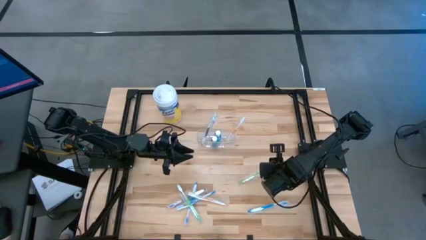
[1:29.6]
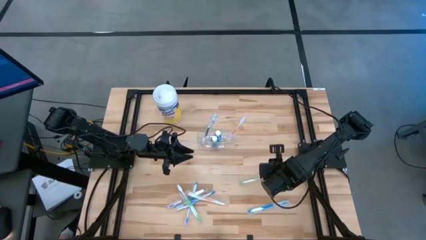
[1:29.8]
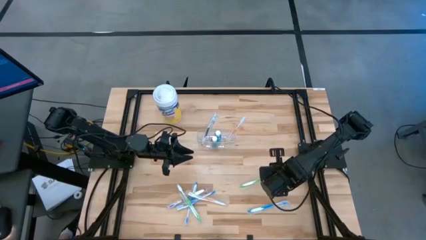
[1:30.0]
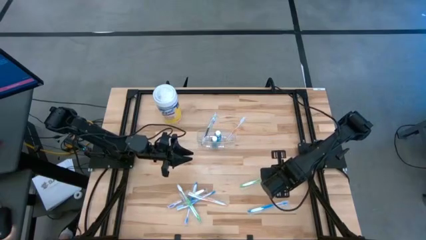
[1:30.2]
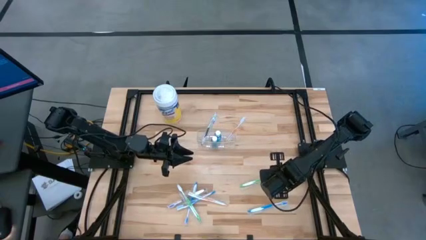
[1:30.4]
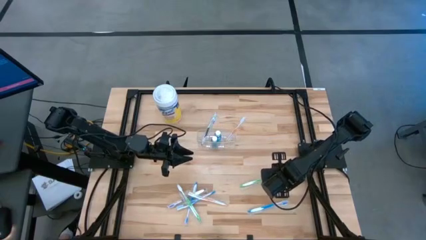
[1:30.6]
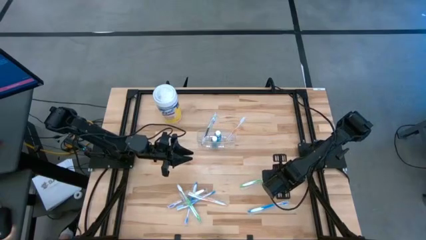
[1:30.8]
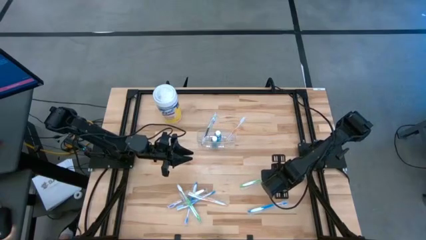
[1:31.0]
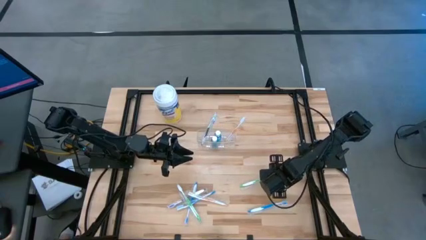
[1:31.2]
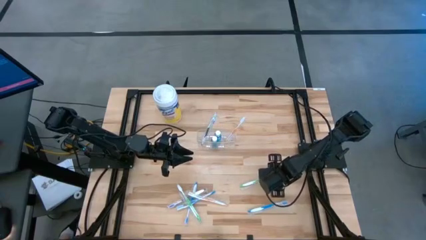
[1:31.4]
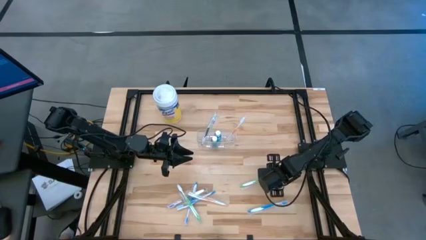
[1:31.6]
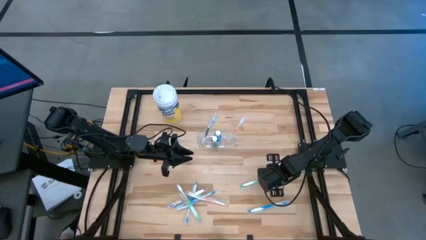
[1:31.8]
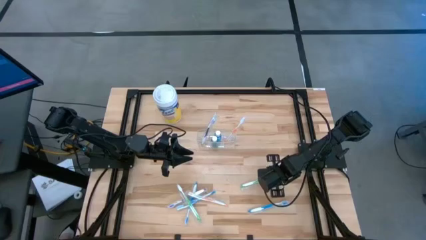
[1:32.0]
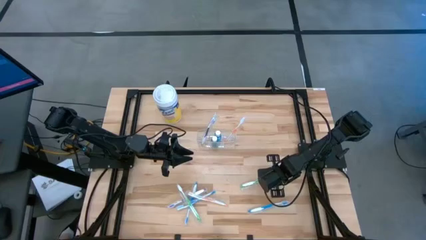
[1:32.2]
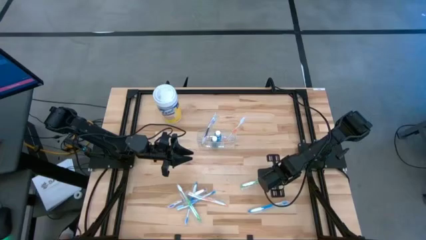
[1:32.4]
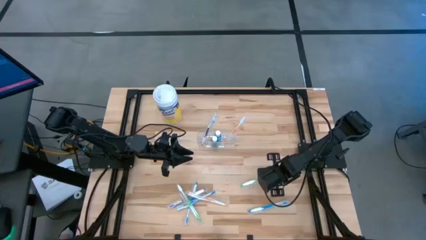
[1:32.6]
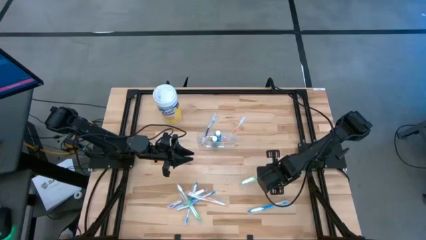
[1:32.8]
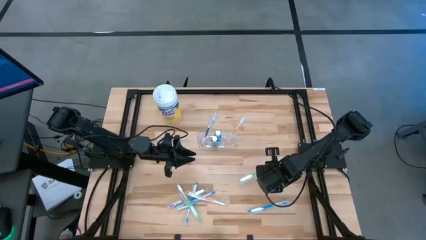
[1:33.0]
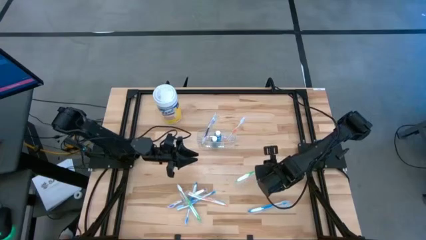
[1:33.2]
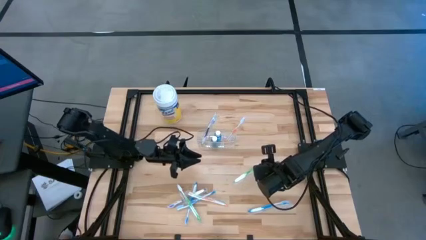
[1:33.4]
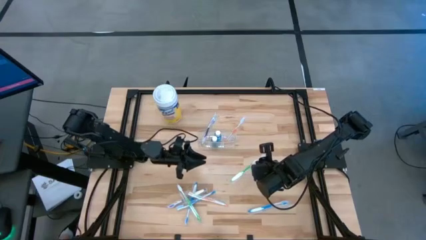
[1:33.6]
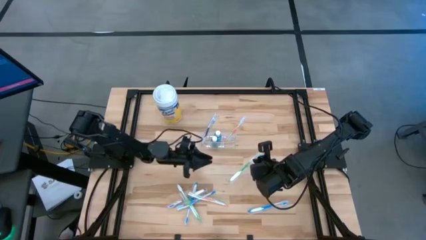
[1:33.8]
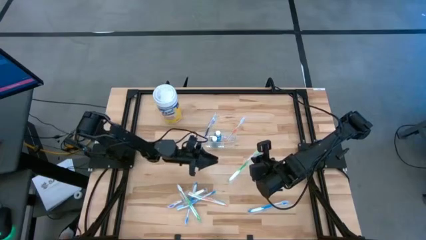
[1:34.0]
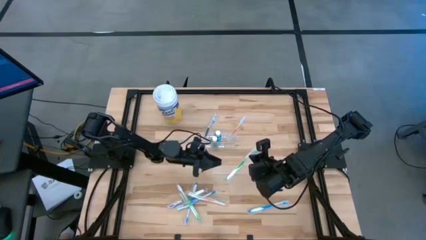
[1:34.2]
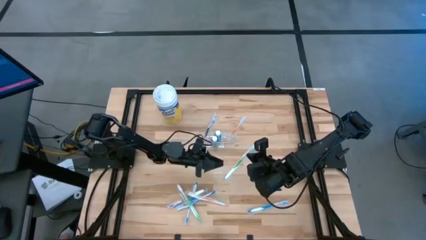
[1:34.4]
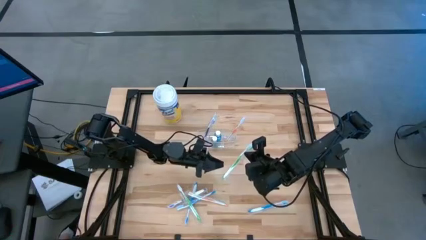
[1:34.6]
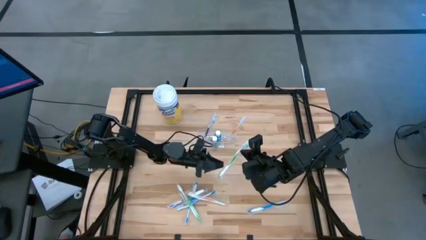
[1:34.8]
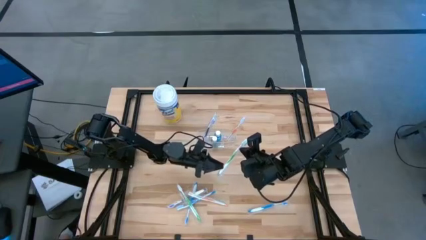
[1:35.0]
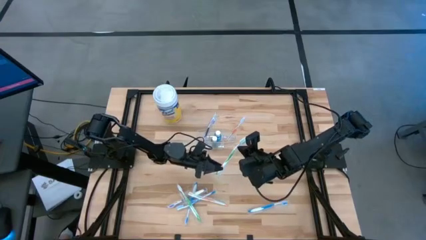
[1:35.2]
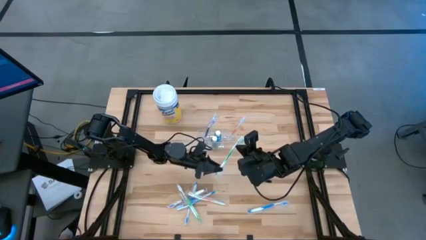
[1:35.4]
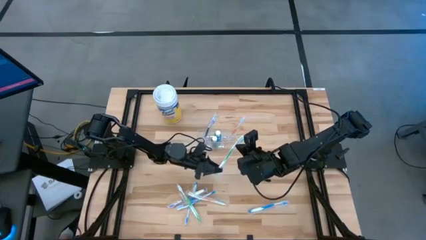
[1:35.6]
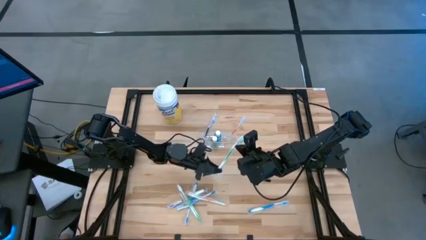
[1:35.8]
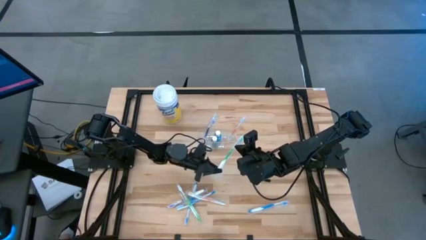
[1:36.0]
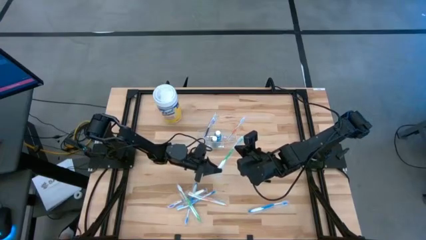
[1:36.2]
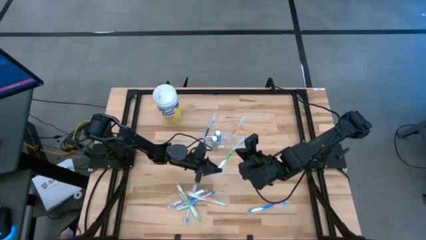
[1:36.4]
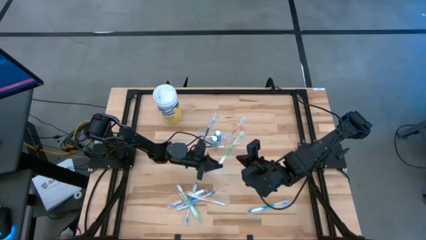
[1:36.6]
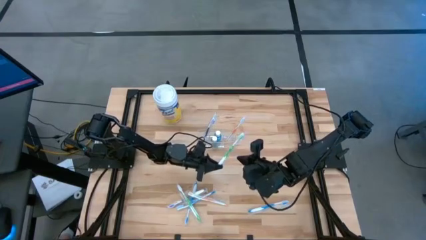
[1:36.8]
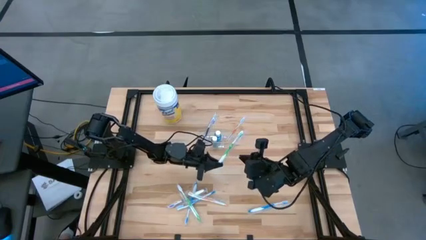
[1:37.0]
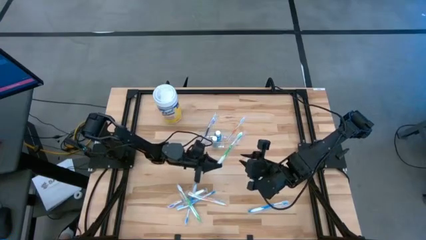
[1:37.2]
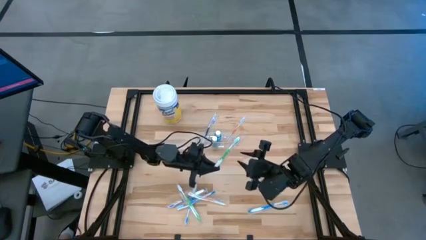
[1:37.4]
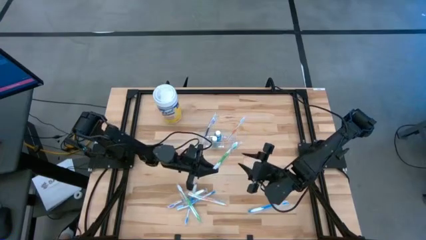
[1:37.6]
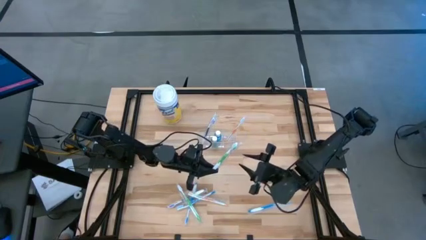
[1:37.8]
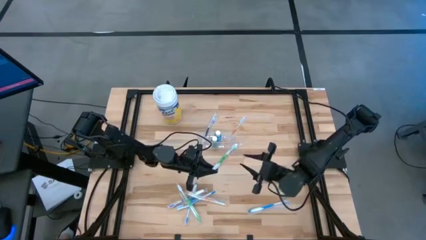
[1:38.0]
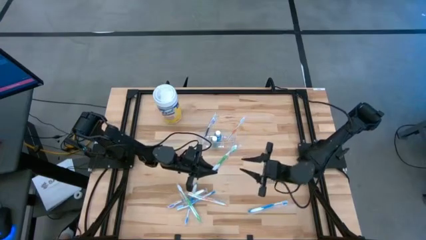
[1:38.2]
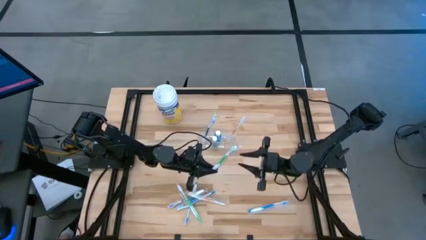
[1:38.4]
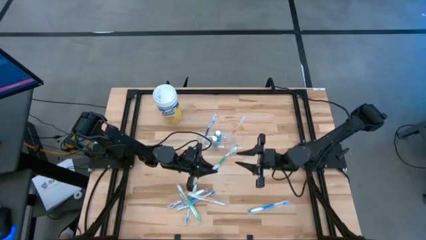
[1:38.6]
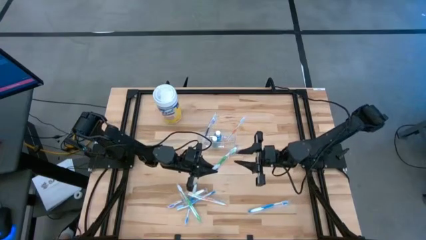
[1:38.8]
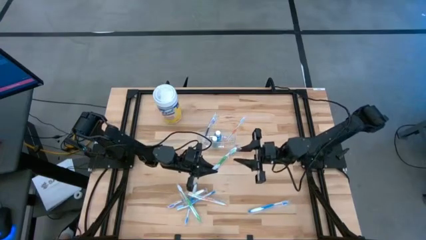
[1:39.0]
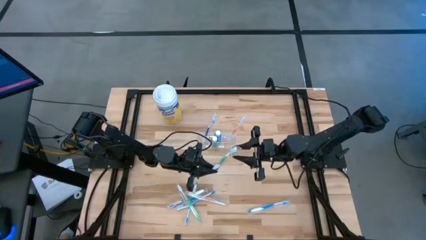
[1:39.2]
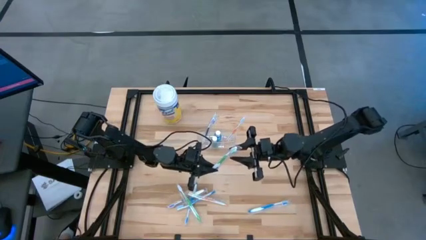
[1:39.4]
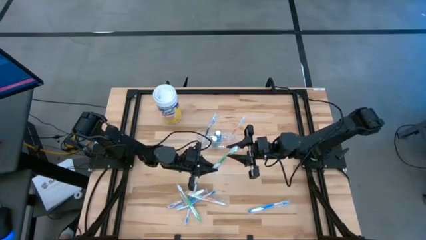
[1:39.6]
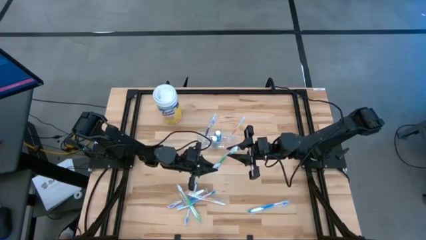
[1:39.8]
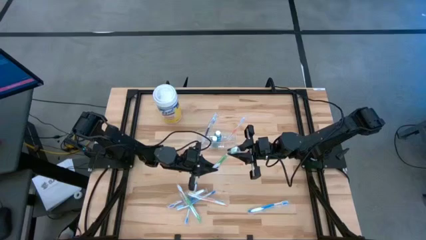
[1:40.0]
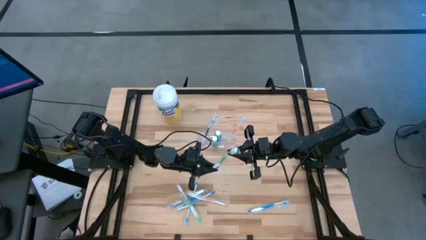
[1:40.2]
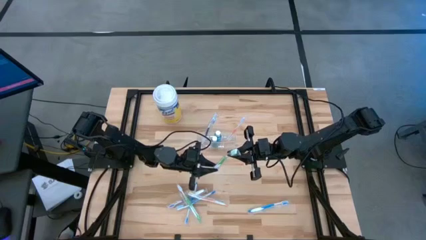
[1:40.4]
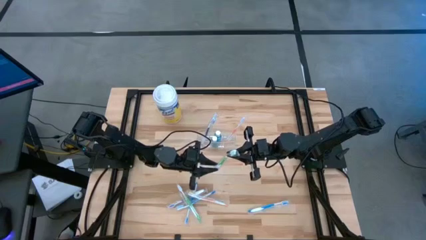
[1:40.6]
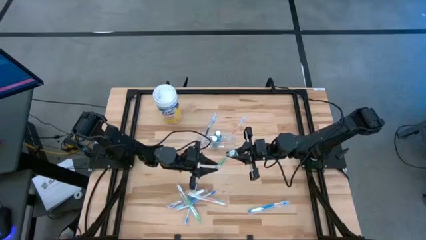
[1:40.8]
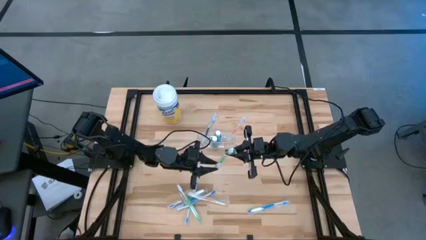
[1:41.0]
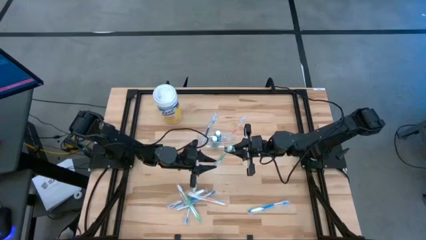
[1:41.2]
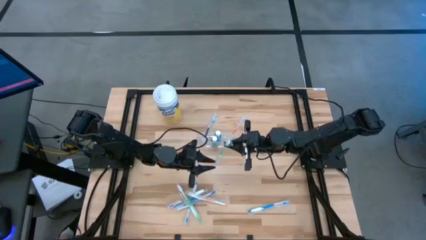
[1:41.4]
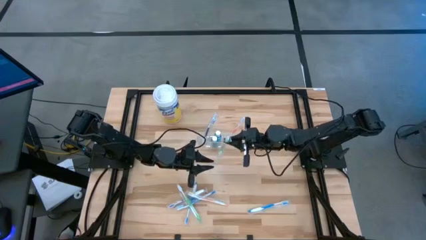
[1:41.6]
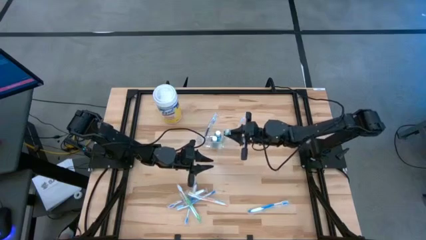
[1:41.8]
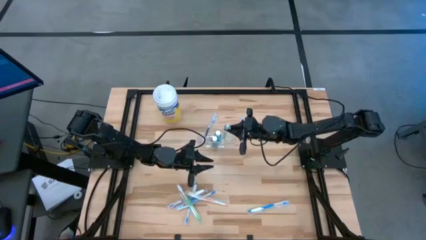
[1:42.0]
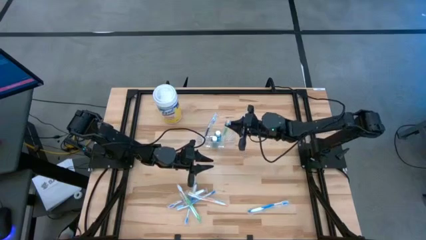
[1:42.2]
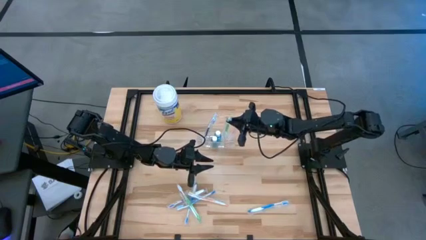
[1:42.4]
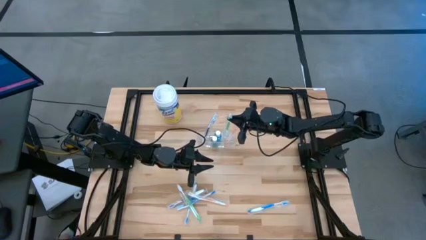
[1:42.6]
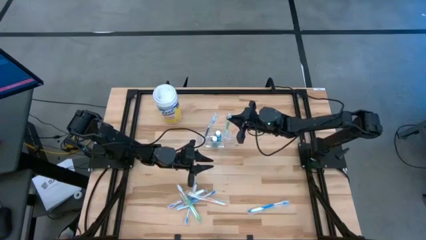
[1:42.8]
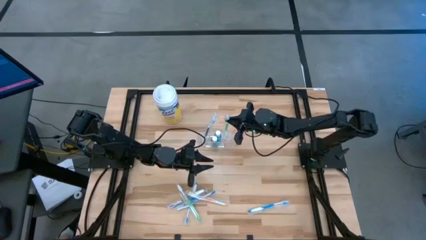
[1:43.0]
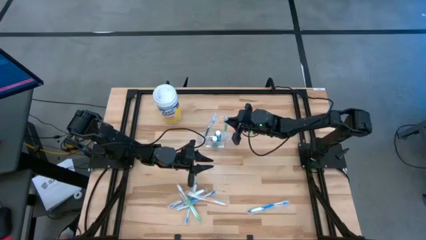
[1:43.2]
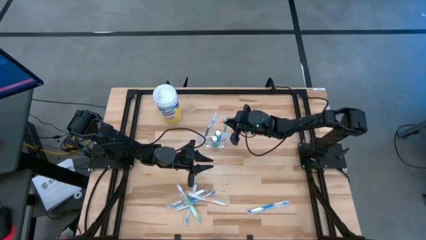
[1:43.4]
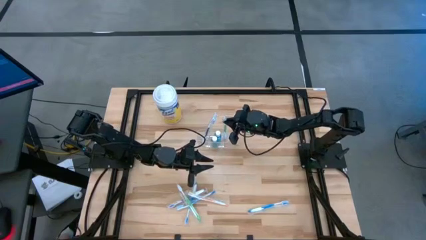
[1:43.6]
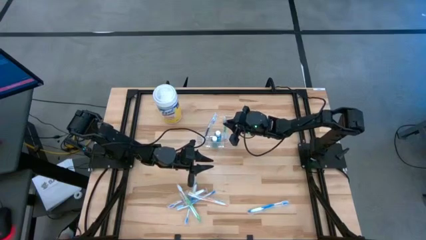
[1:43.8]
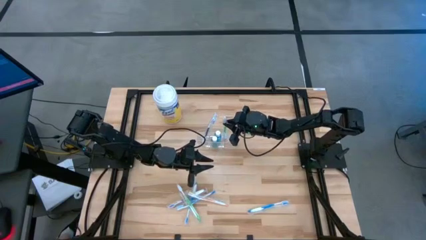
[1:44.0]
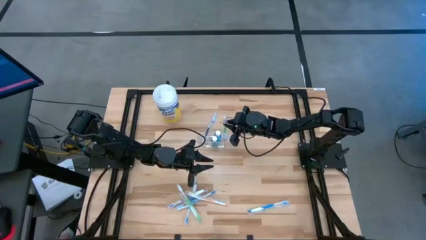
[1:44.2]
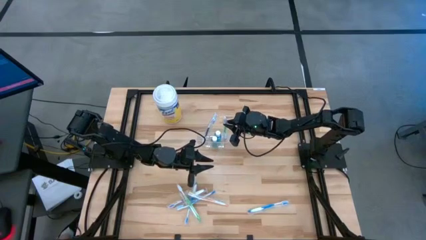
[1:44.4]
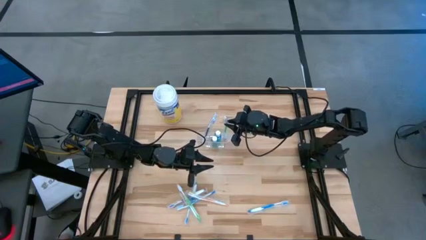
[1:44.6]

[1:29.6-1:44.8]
Task: Pick & Place toothbrushing station
Put the right green toothbrush into the transparent organizer
